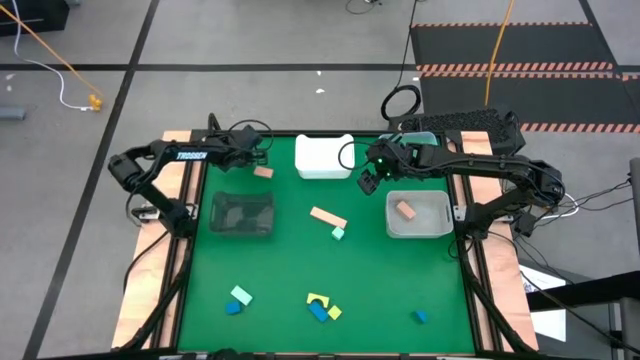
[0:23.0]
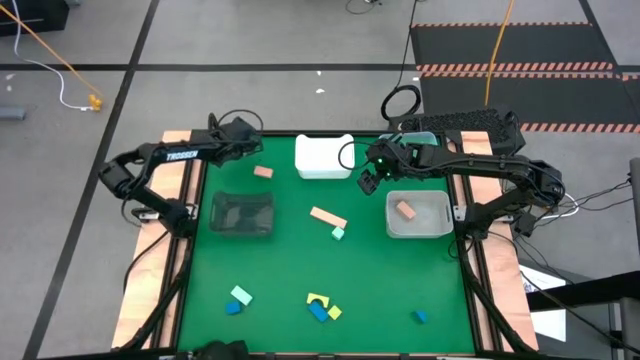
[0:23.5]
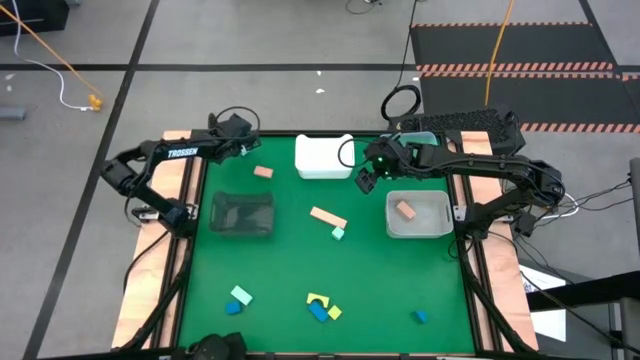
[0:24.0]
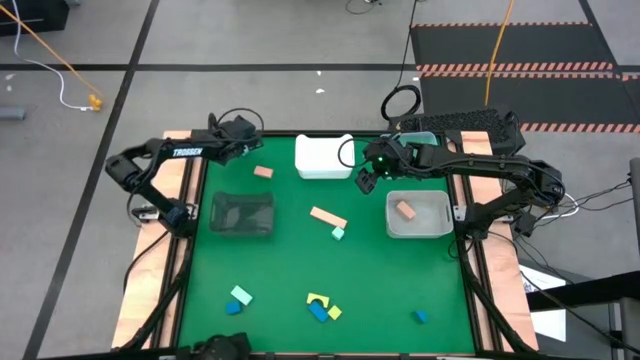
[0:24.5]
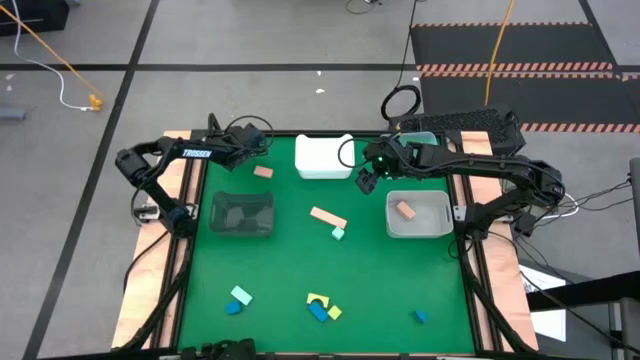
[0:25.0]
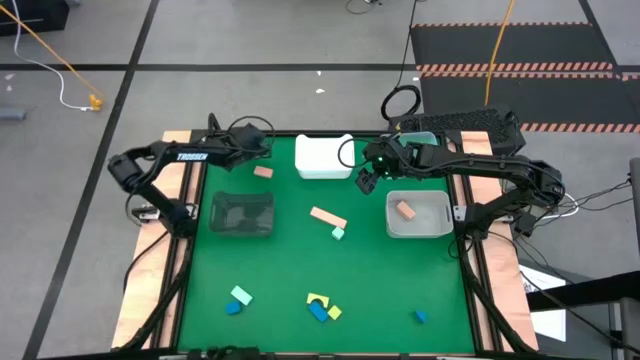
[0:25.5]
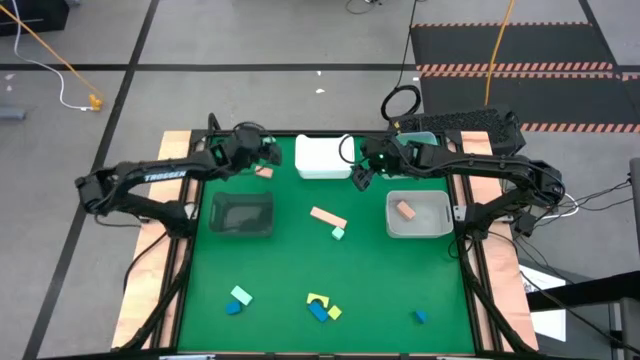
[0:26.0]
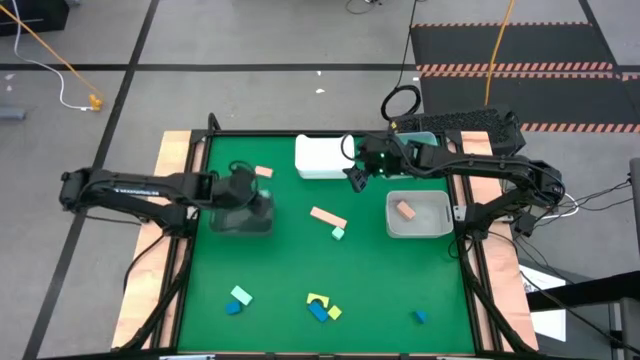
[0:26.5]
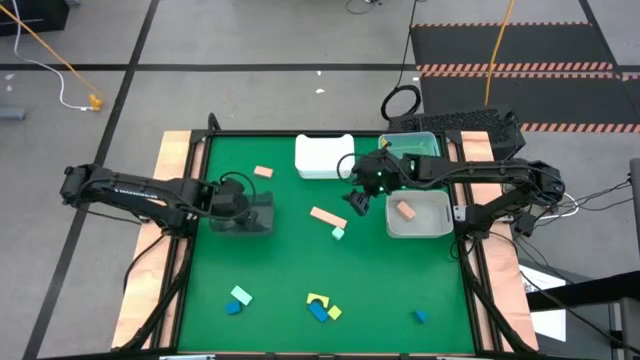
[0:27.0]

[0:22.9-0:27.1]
Task: Sort & place blocks by color
Put the top light blue block into the black bin

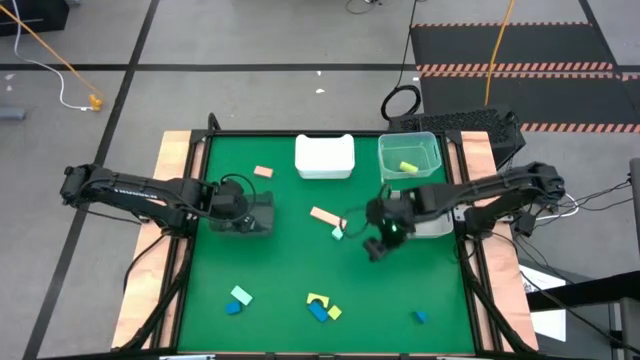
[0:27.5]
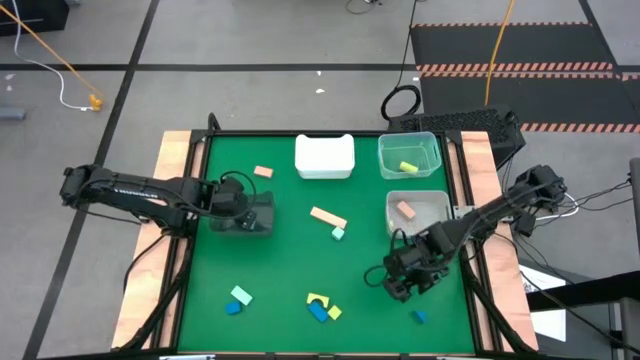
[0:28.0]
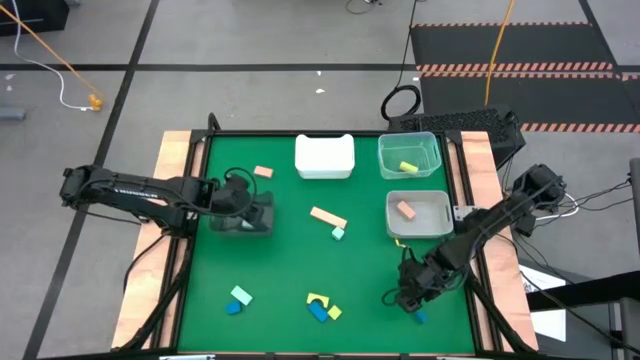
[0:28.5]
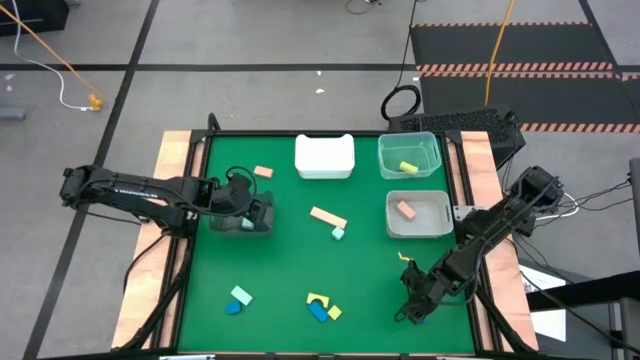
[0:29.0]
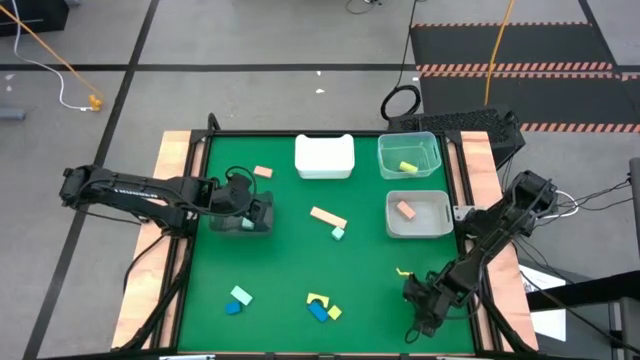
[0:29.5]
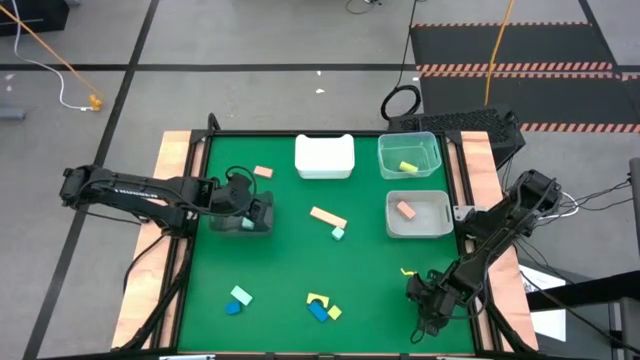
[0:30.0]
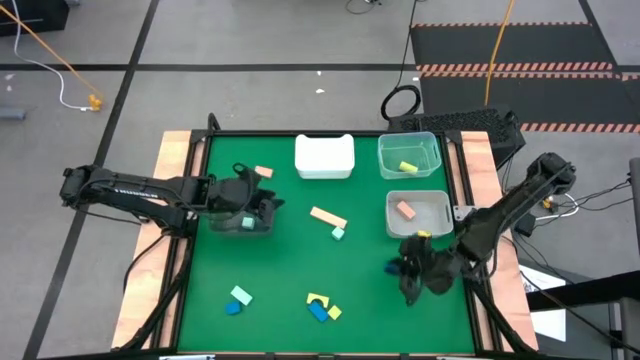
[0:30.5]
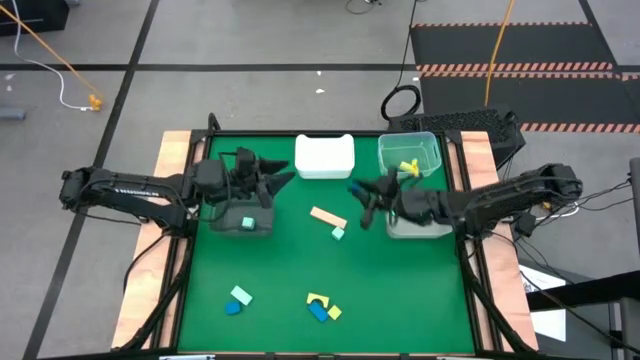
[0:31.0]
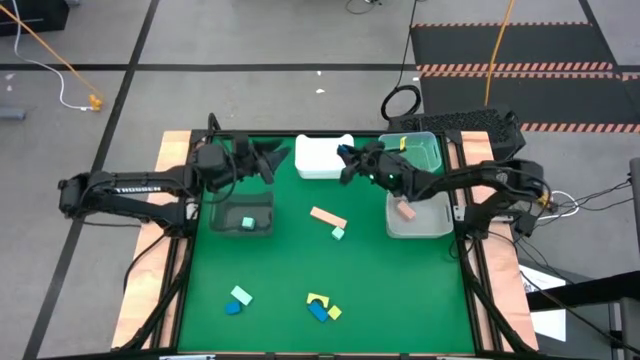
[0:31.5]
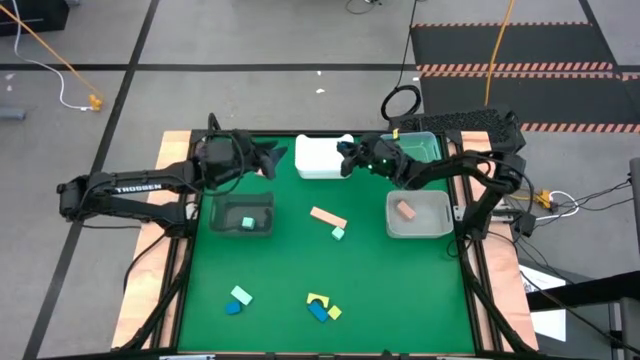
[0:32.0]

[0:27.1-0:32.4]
Put the right blue block into the white bin

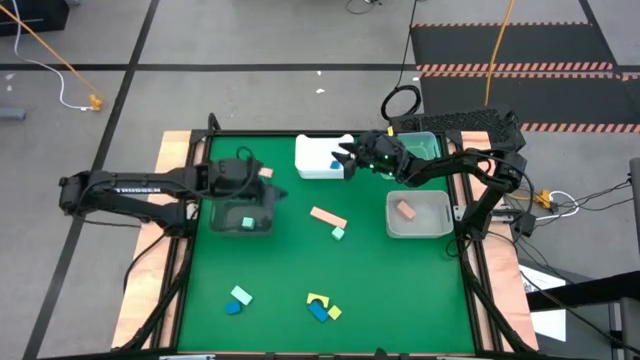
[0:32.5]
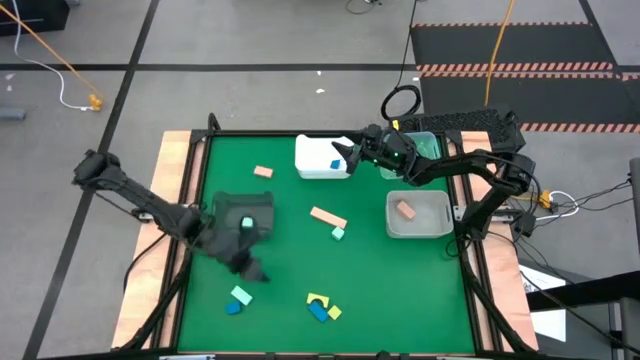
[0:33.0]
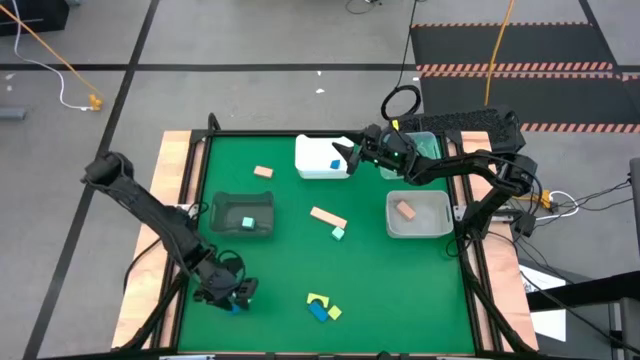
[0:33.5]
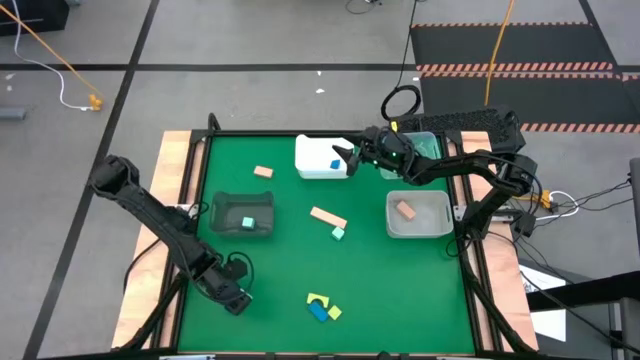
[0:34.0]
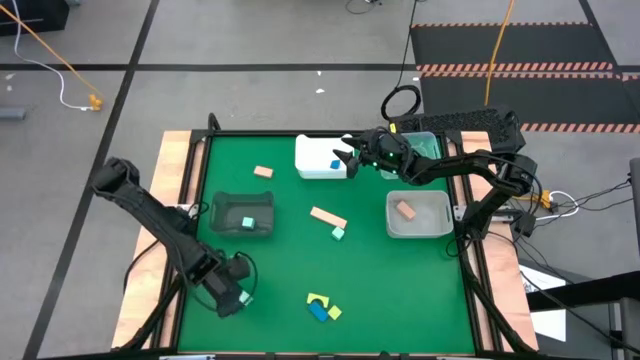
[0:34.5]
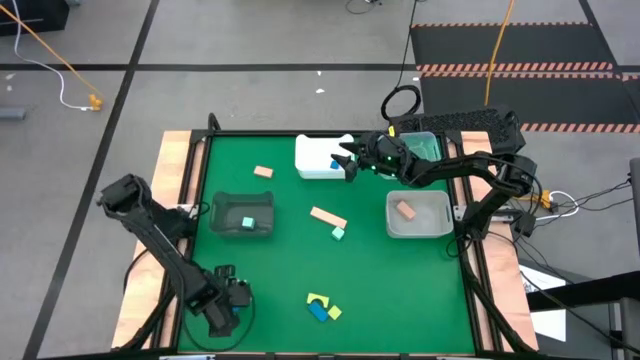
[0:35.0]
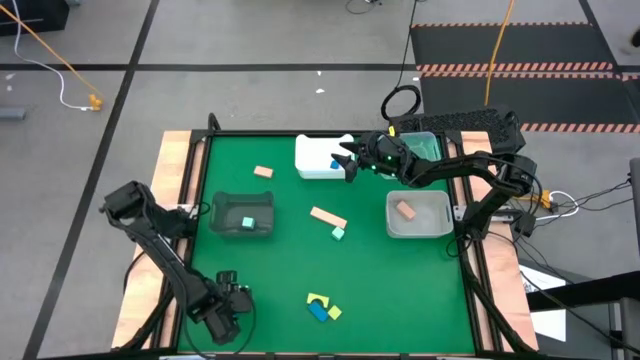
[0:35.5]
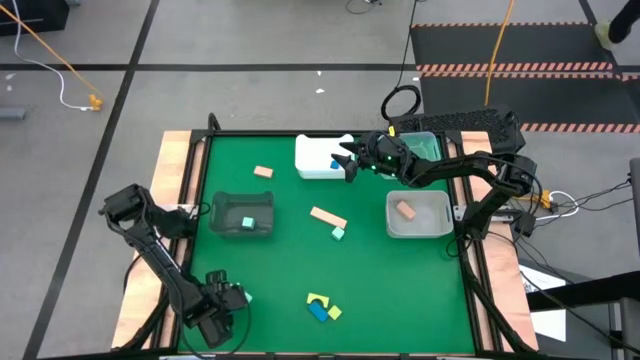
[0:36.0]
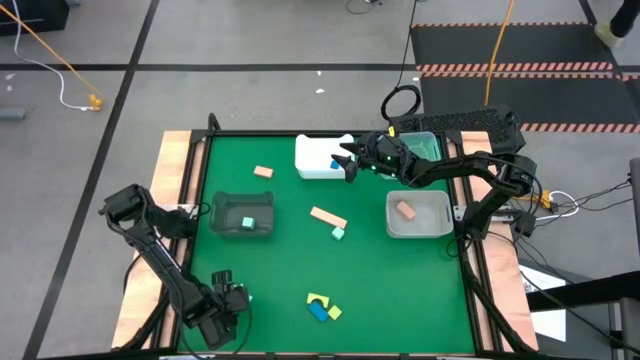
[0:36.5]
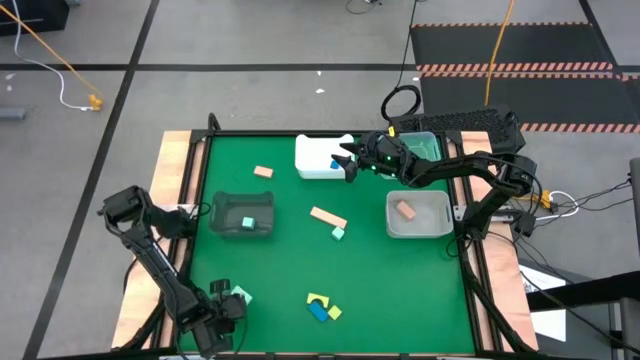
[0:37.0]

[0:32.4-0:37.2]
Put the left blue block into the white bin

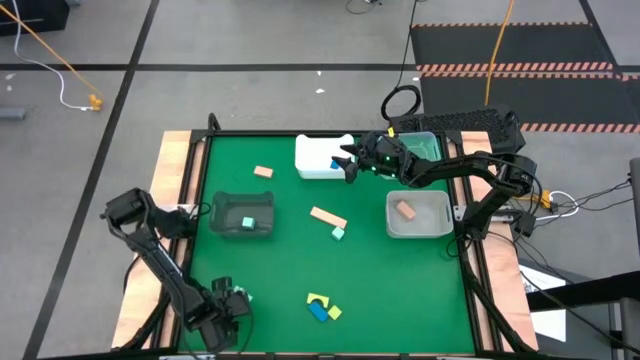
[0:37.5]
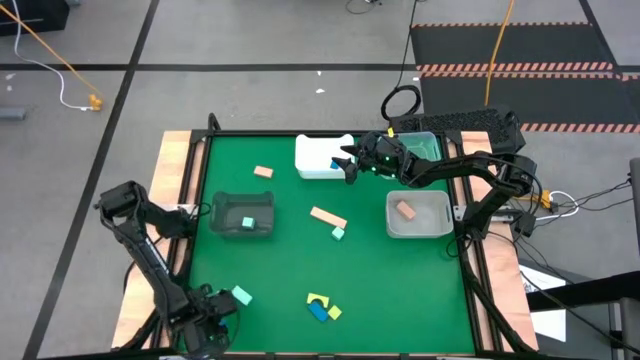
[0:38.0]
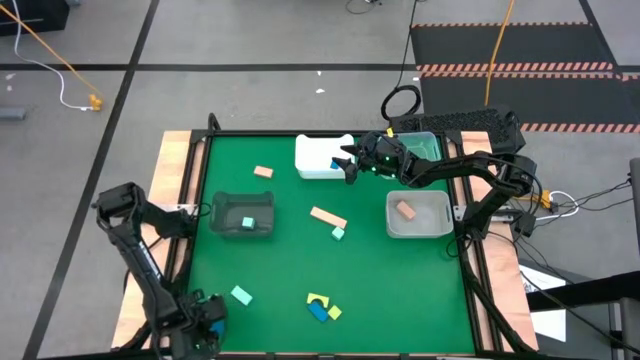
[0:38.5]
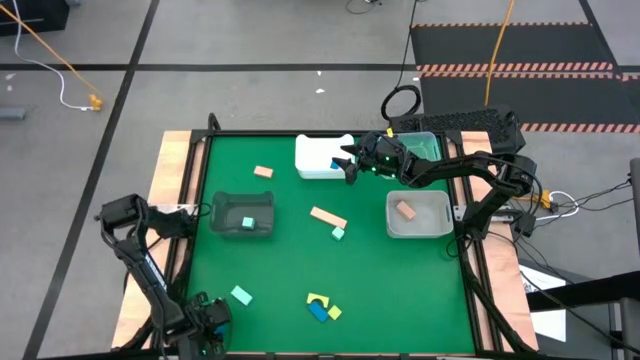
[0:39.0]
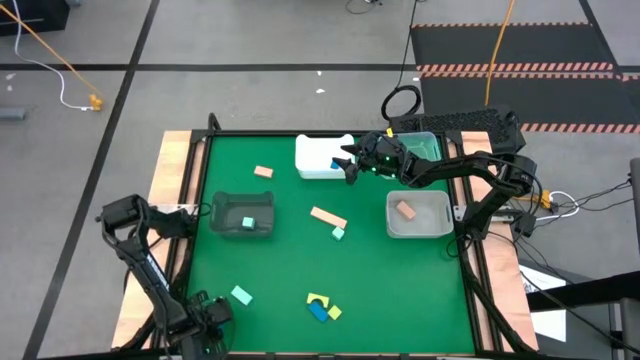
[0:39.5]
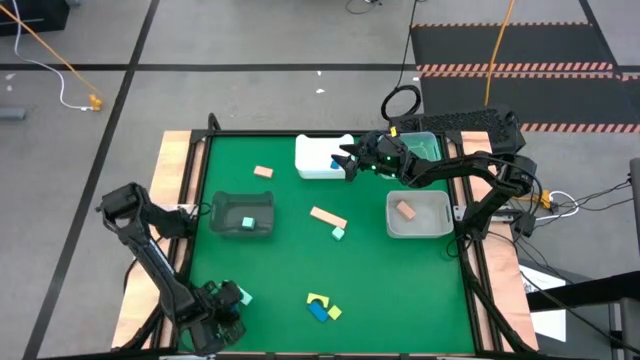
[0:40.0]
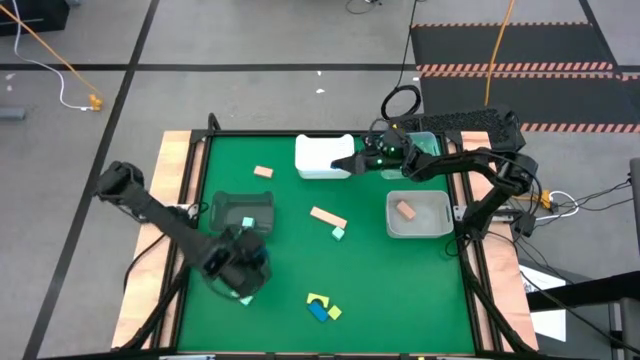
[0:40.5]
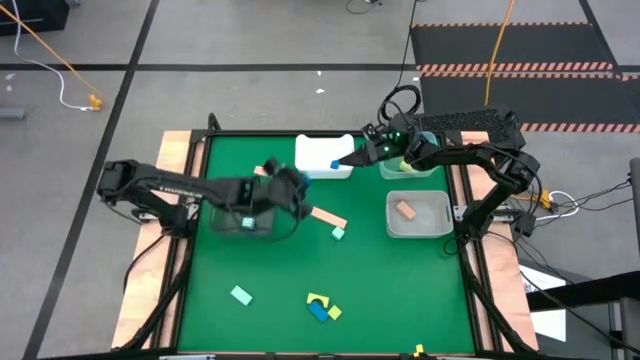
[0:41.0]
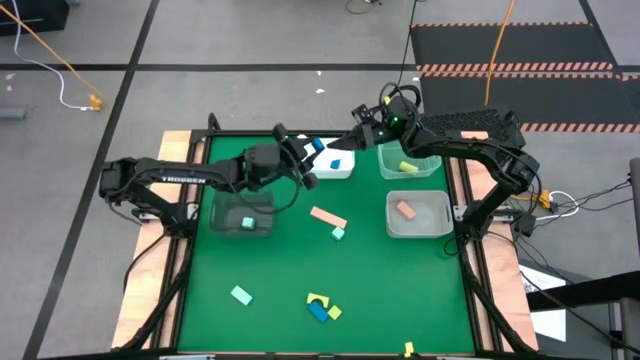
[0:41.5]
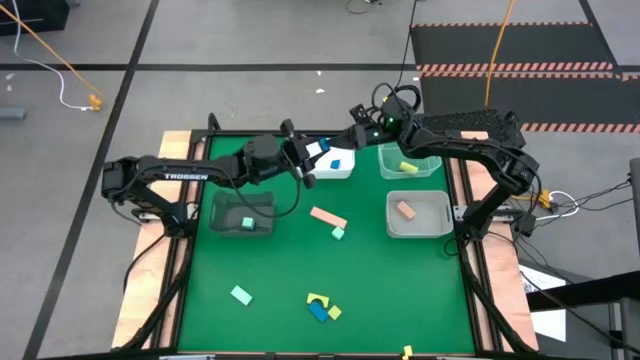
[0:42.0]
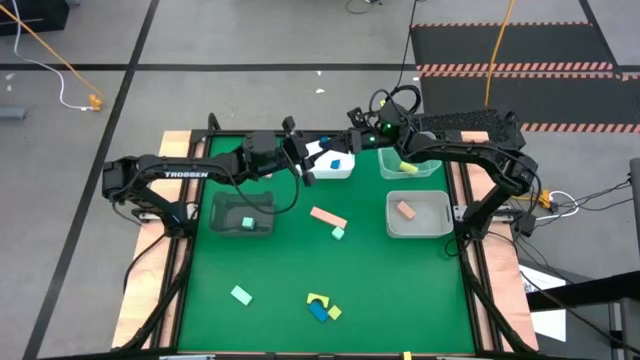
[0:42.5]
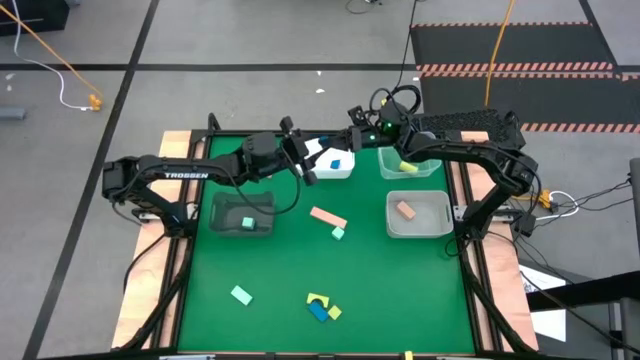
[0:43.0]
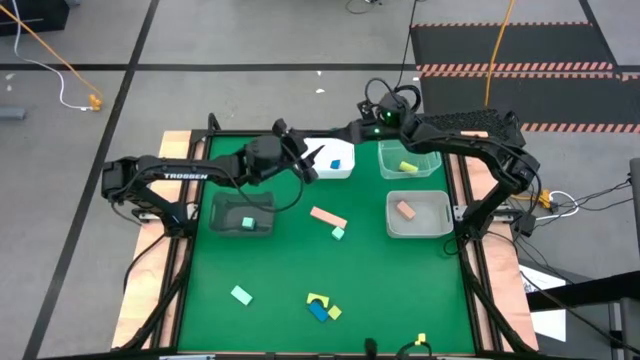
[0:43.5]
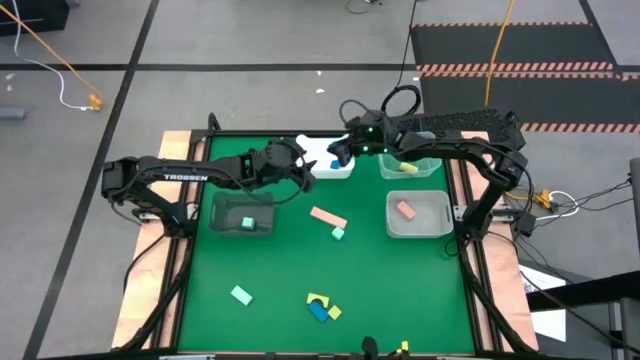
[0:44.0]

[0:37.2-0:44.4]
Put the left blue block into the white bin
